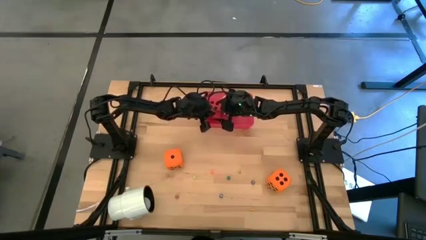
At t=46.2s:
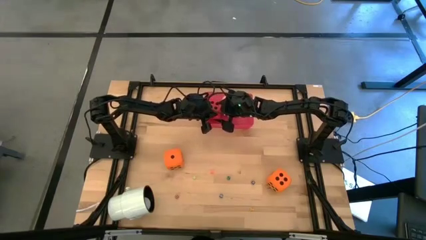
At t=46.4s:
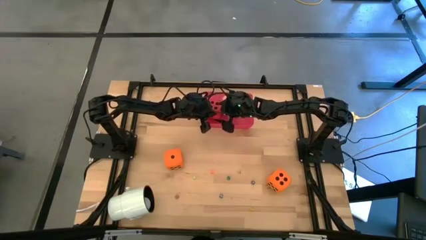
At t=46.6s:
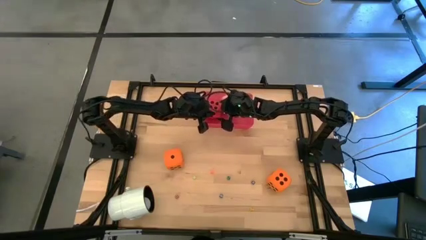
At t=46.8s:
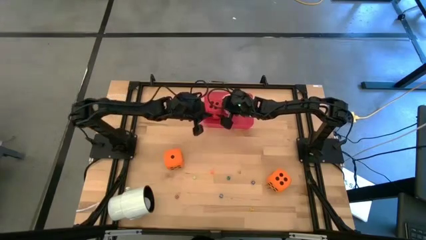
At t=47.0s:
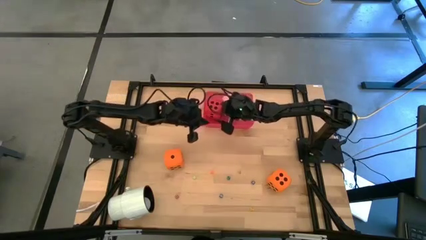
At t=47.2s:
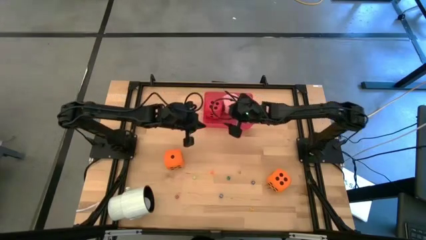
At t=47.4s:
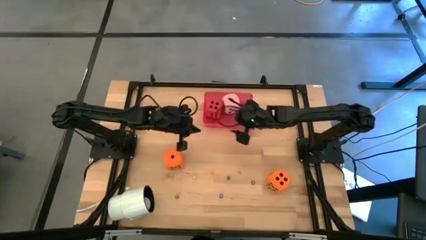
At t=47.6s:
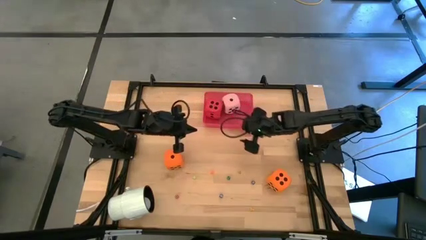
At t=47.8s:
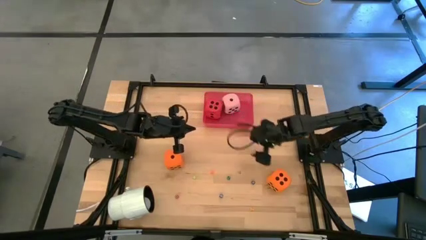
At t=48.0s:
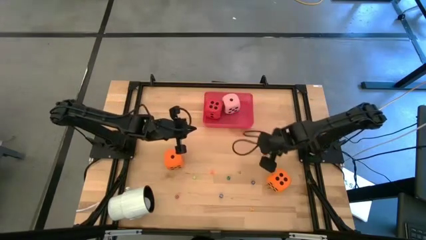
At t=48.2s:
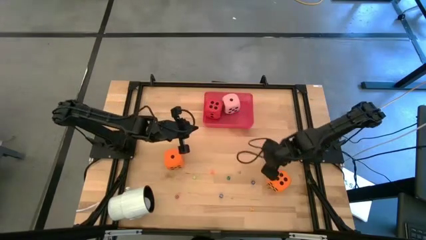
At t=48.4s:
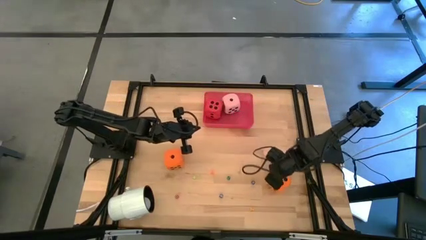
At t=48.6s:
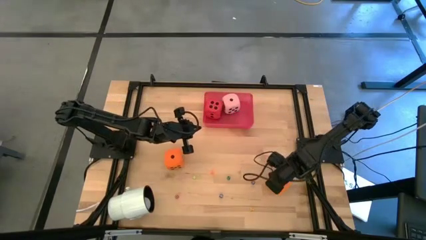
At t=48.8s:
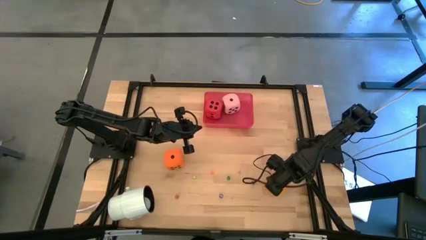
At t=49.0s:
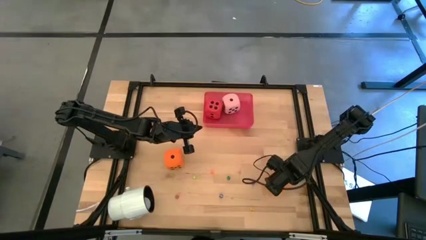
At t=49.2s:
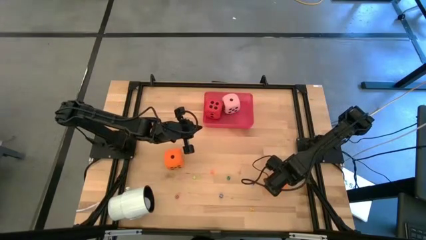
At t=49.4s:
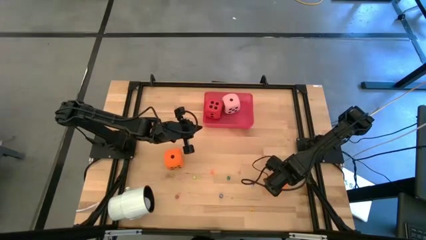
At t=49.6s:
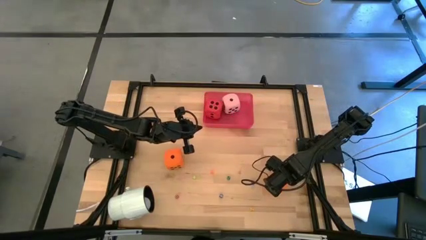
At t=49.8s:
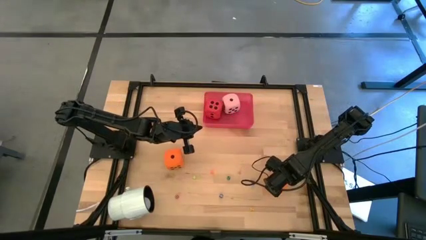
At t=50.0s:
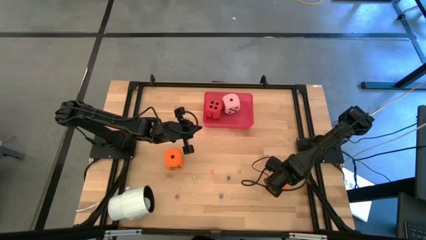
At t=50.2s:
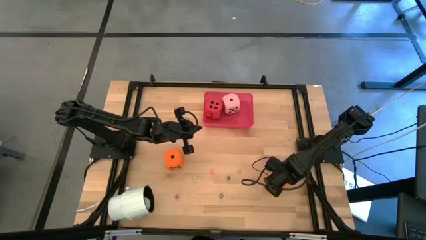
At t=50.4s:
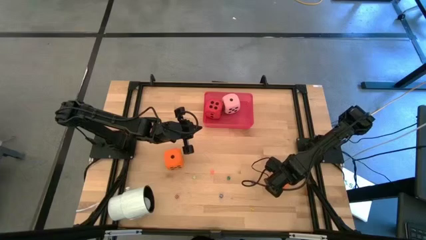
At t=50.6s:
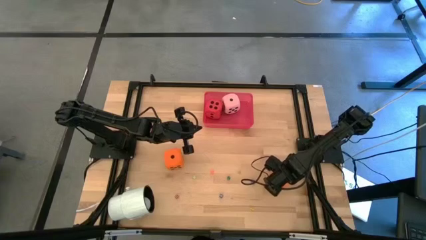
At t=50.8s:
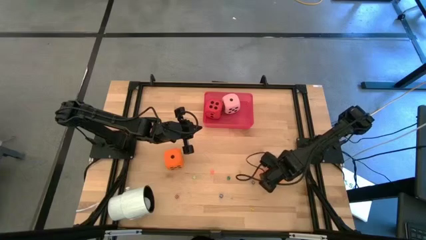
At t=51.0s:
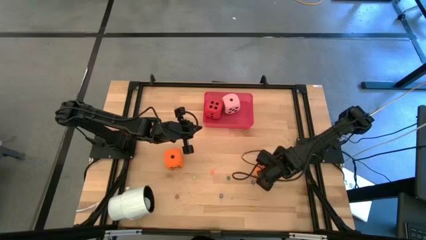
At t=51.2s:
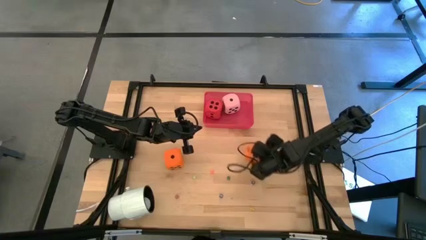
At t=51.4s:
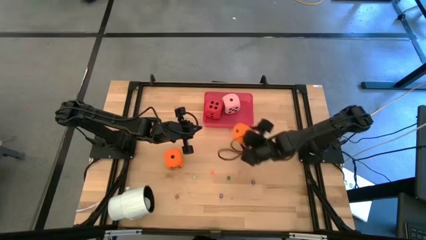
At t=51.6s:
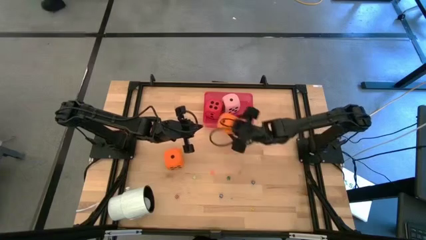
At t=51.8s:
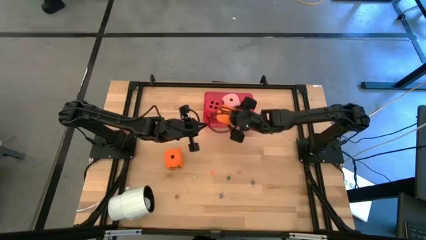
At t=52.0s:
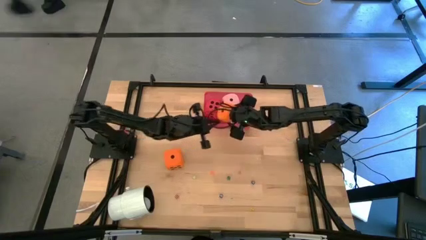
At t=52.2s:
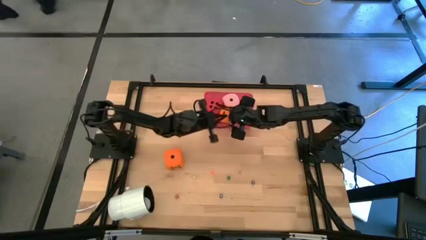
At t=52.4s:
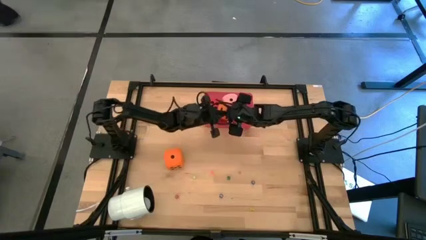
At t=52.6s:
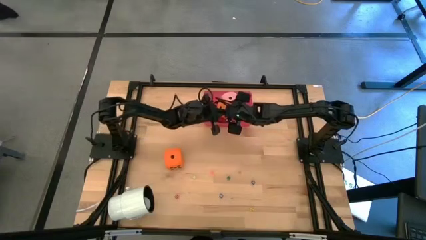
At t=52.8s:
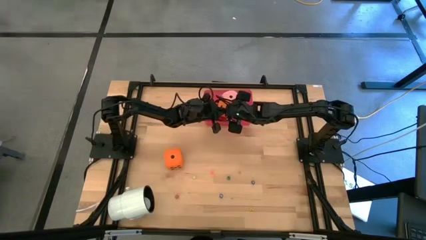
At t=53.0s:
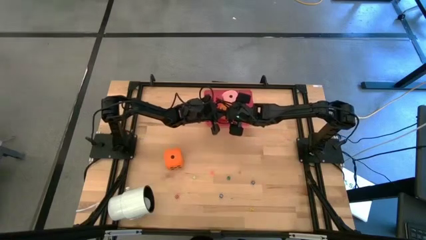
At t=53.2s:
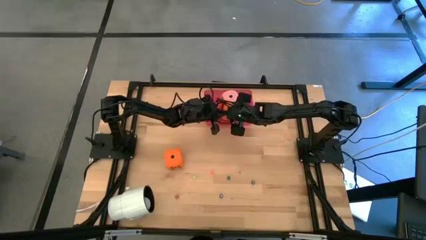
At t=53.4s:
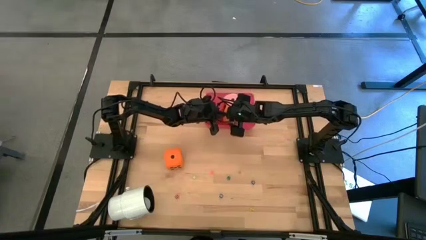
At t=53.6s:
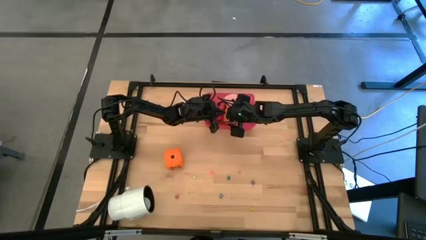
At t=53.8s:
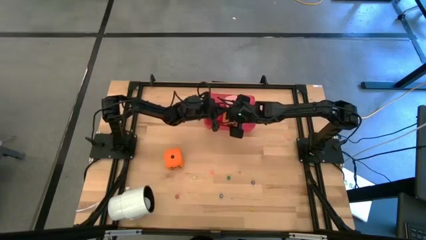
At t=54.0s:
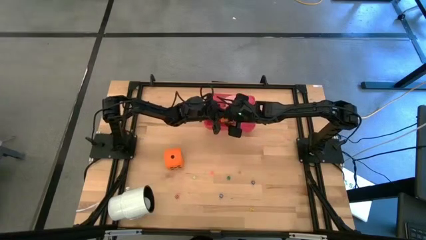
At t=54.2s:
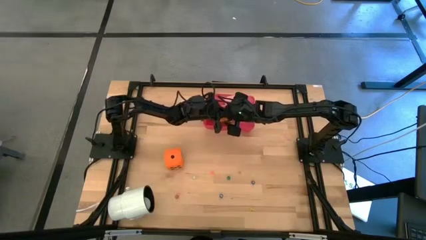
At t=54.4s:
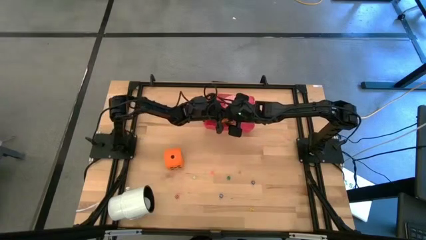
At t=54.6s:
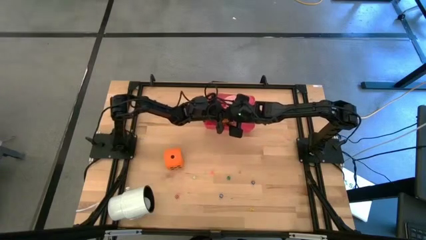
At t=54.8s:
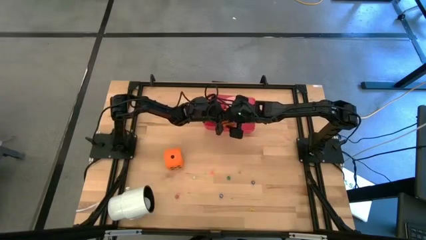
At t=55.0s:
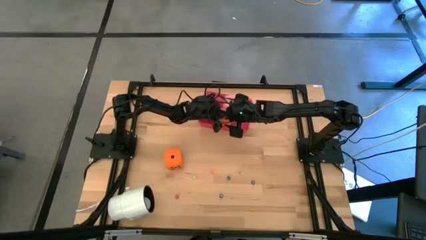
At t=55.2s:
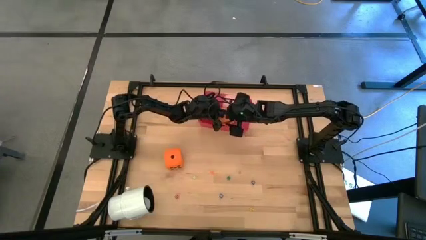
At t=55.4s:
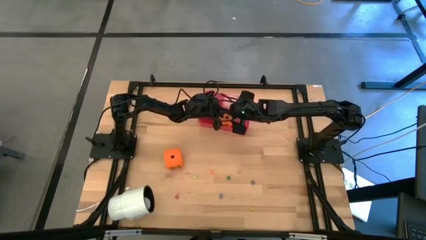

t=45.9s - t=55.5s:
Task: Pick & Place Dice
Put the right large orange dice into the red container

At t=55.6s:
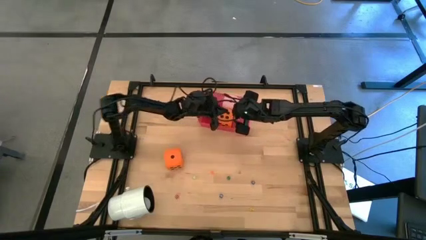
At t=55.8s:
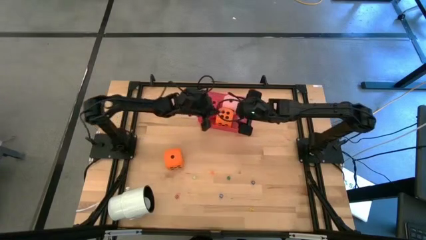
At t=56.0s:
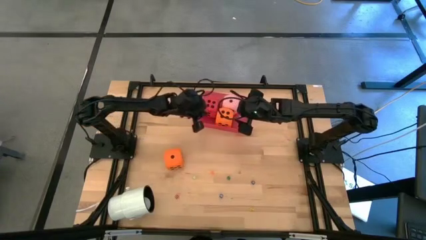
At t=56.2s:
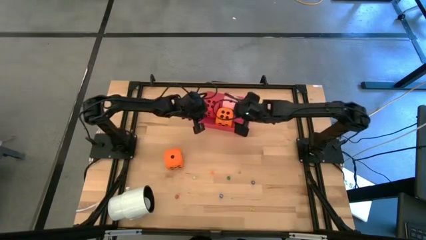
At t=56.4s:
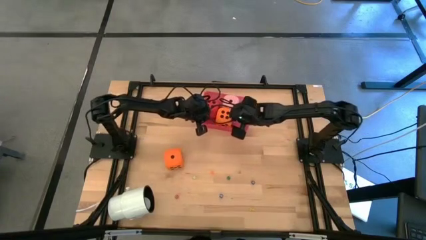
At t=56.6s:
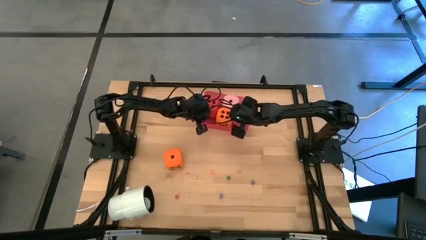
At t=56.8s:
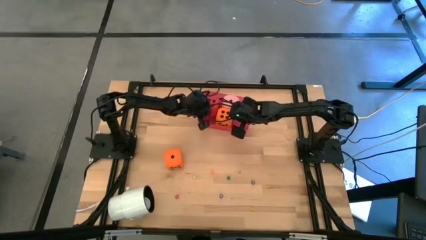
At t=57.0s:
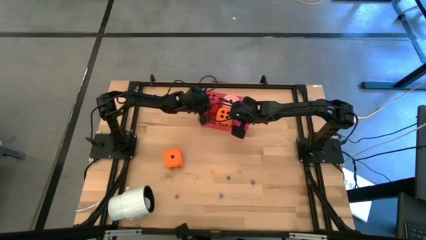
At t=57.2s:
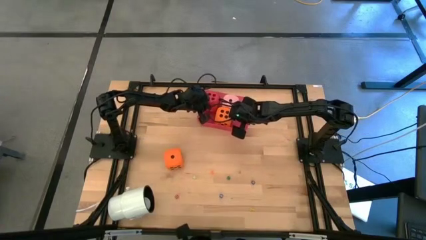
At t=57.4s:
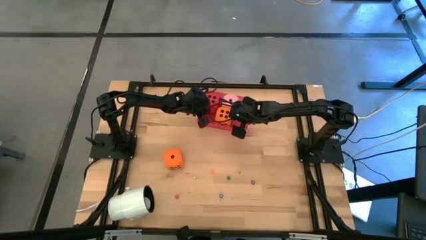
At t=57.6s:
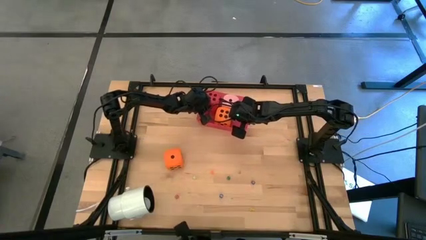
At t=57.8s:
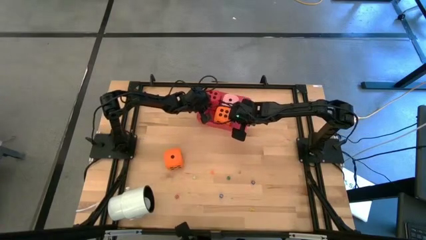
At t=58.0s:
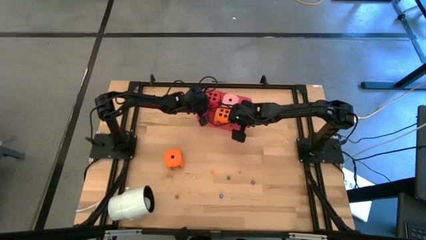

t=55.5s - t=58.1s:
Adjust the large red dice in the red container

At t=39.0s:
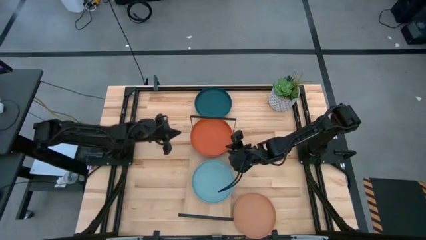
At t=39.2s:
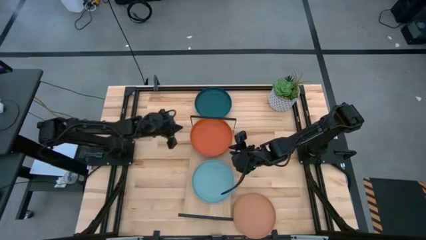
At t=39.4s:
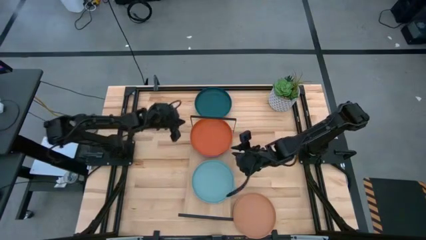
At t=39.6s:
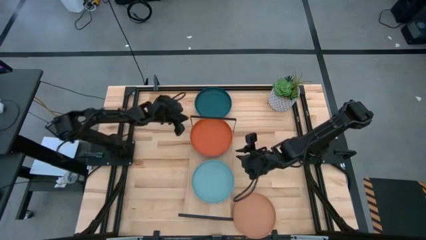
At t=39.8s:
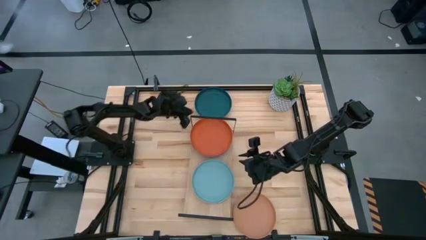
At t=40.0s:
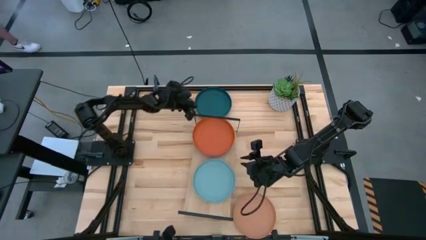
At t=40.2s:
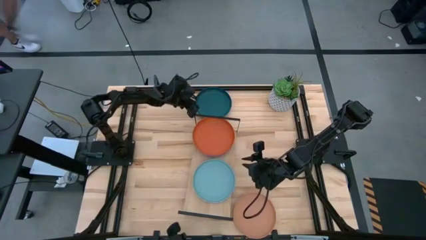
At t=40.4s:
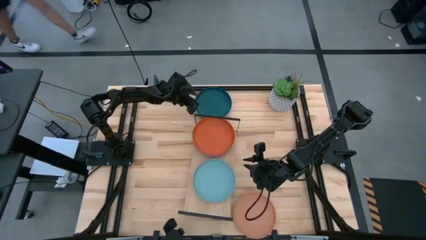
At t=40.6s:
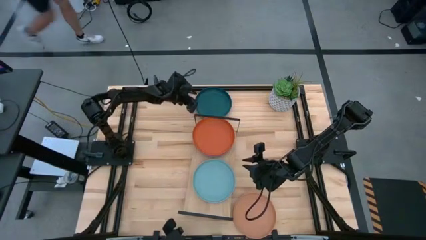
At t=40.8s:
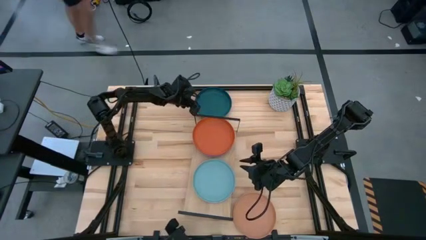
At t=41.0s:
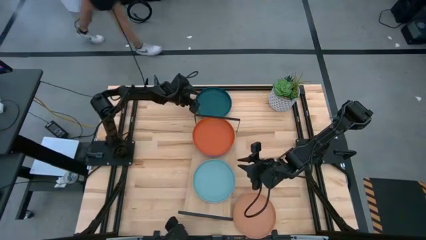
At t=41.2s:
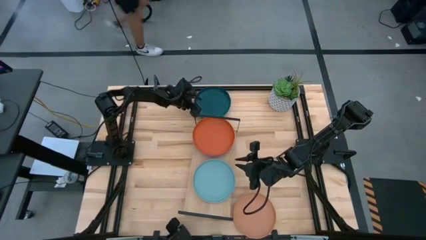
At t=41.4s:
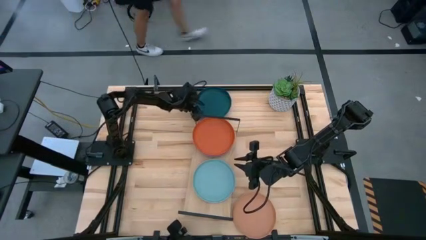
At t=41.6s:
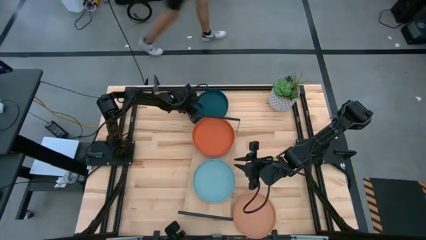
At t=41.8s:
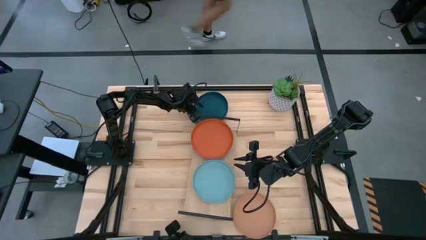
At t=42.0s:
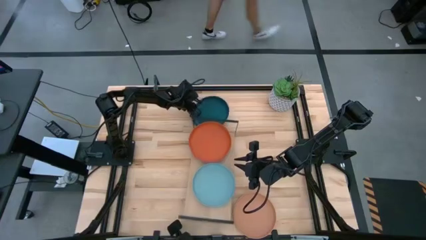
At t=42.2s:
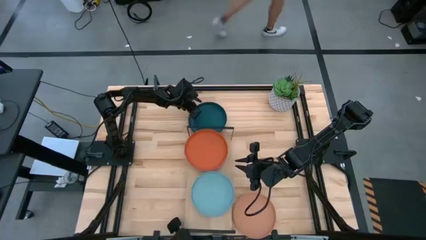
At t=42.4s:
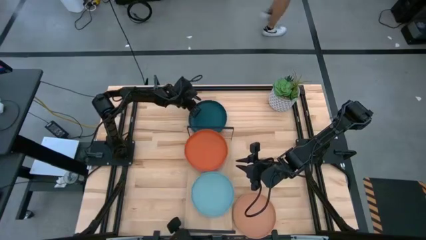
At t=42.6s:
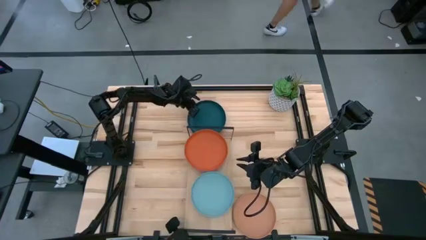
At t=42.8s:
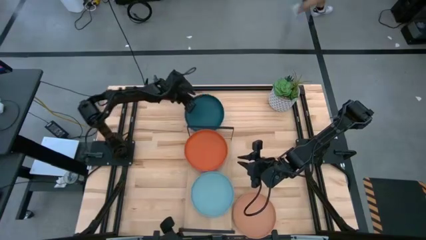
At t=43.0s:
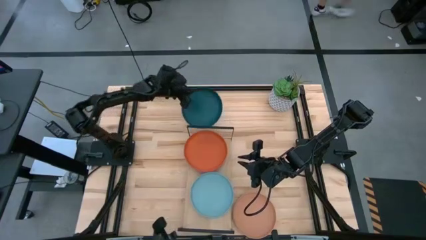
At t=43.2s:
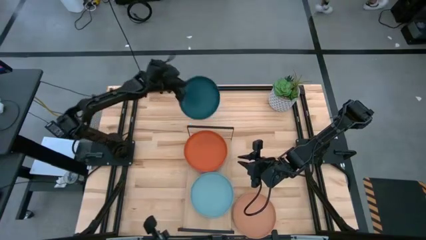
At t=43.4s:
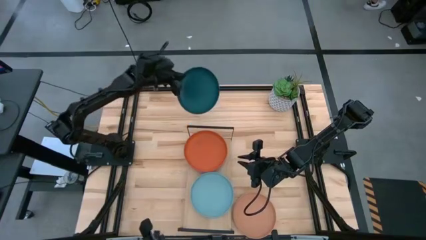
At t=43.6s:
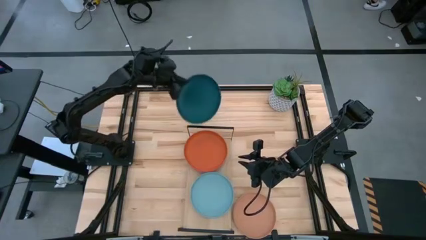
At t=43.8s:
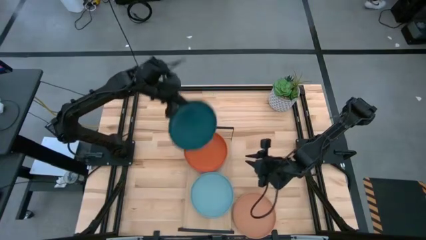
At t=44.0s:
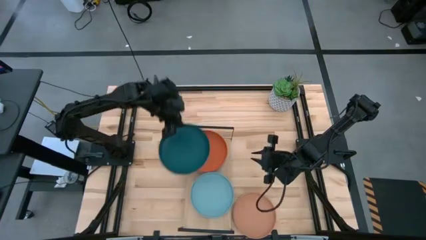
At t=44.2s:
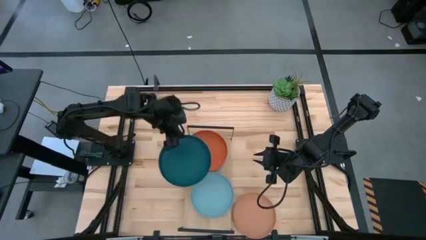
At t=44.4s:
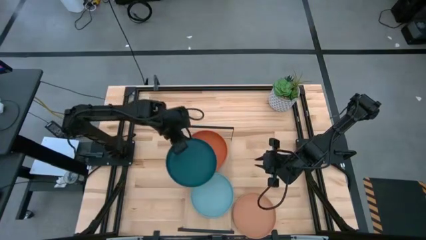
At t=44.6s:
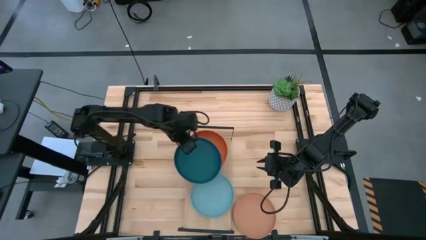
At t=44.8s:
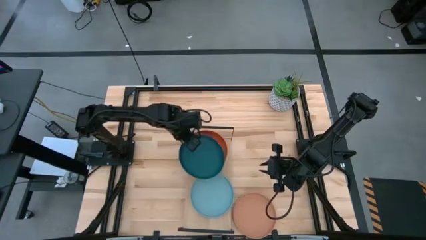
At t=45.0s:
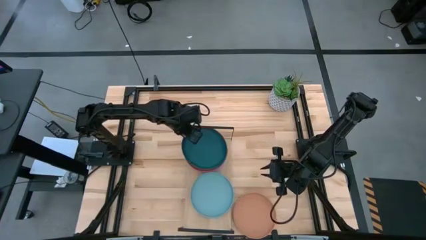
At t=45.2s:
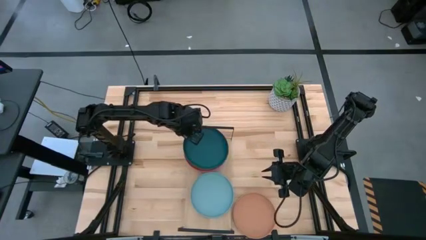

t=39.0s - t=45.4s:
Task: Place and stack plates onto a shelf
Stack the green plate on top of the orange plate on the shelf
